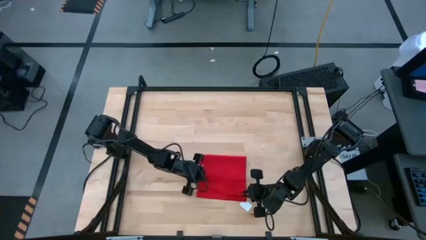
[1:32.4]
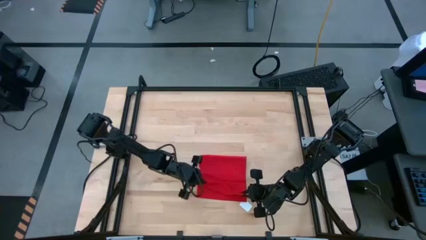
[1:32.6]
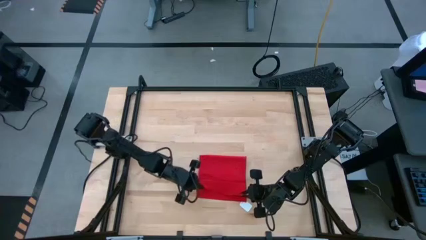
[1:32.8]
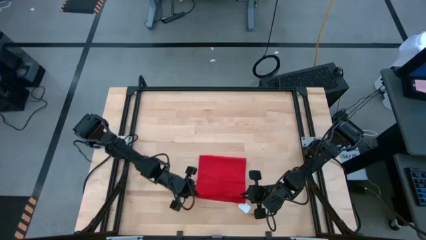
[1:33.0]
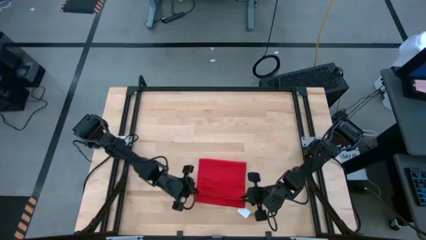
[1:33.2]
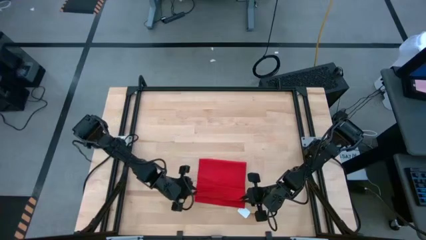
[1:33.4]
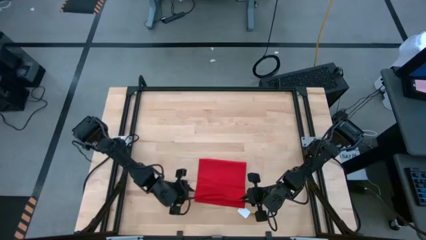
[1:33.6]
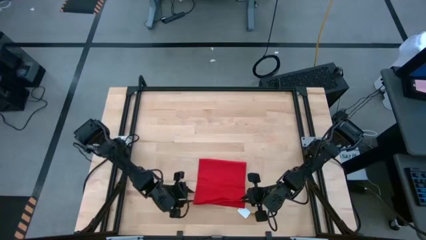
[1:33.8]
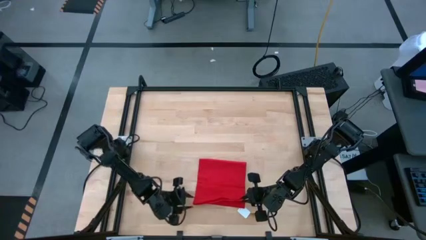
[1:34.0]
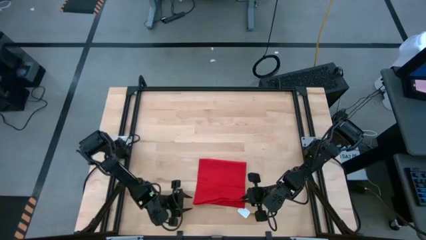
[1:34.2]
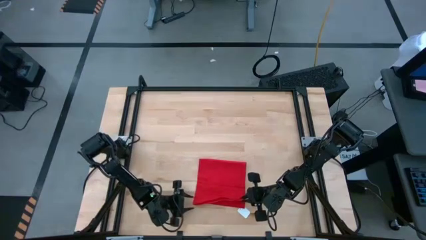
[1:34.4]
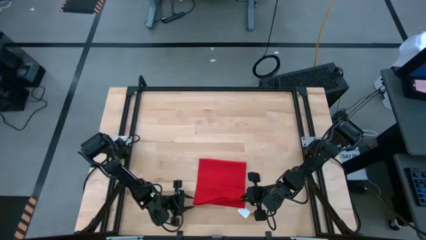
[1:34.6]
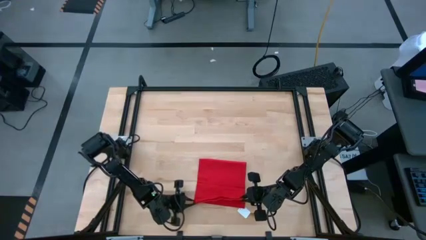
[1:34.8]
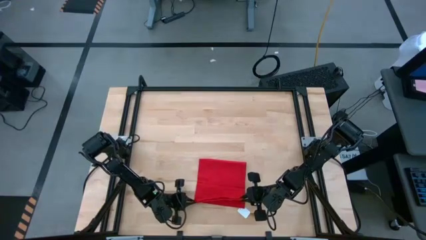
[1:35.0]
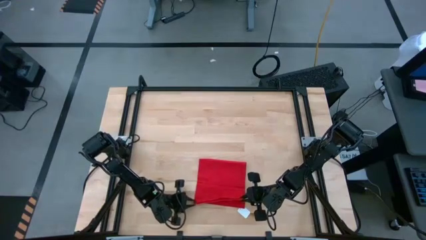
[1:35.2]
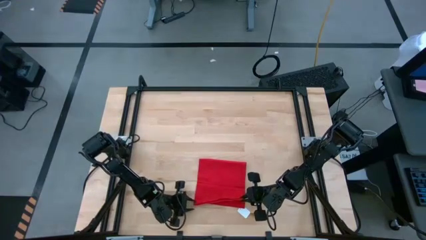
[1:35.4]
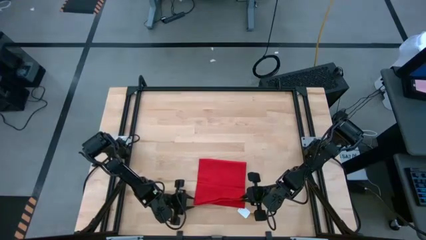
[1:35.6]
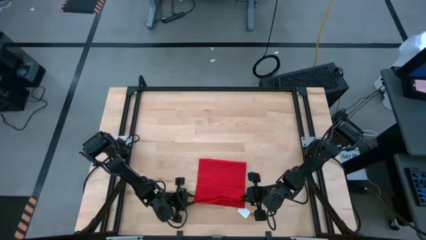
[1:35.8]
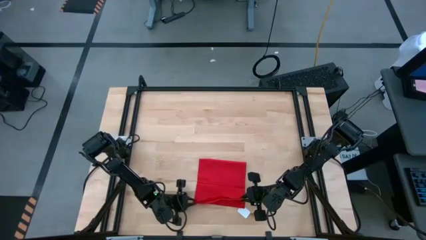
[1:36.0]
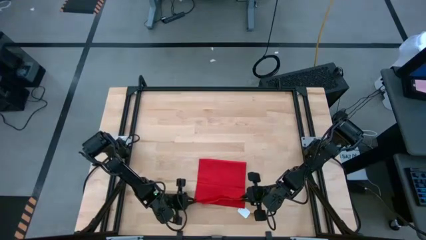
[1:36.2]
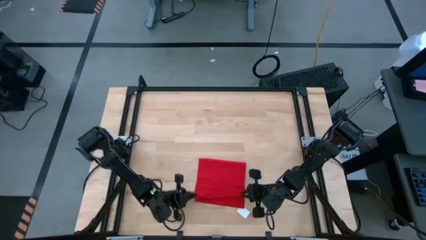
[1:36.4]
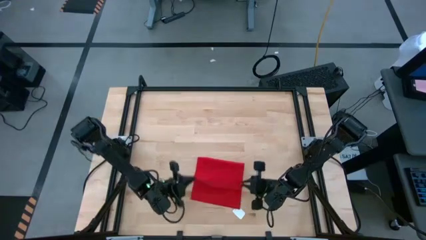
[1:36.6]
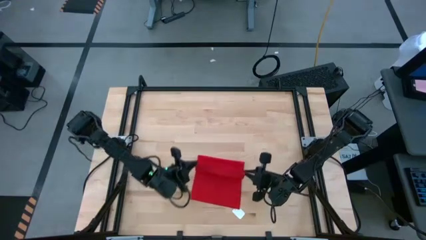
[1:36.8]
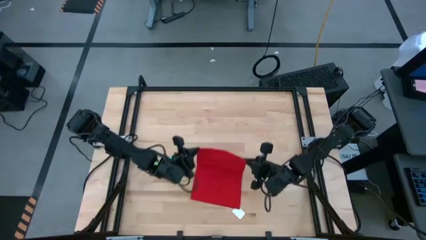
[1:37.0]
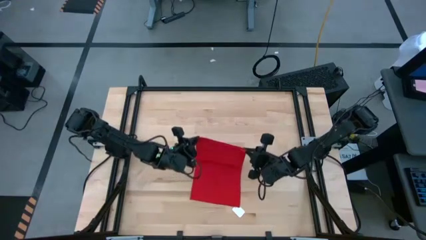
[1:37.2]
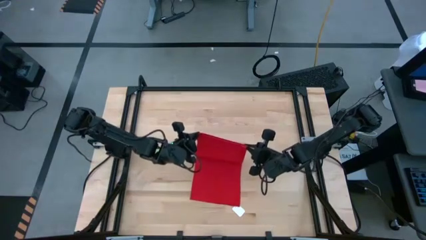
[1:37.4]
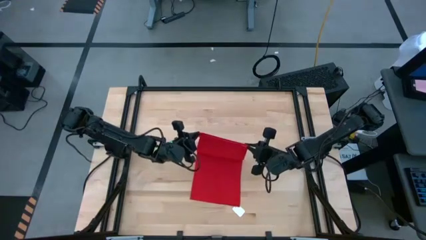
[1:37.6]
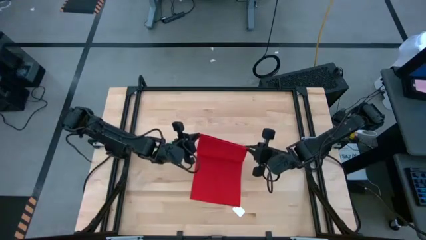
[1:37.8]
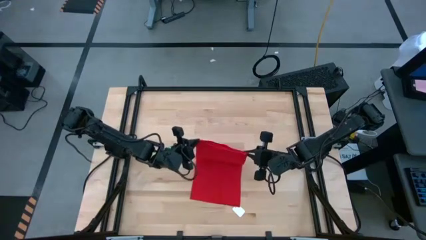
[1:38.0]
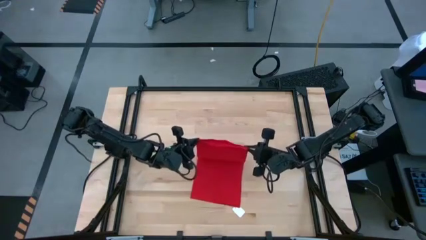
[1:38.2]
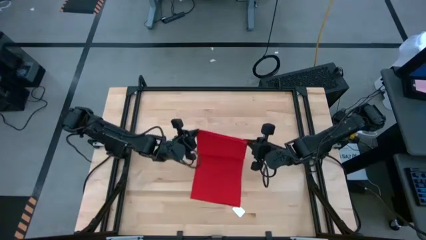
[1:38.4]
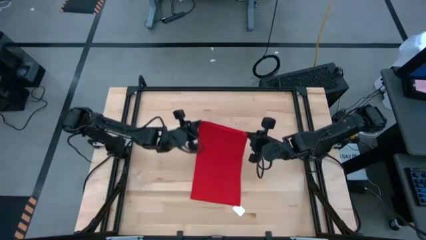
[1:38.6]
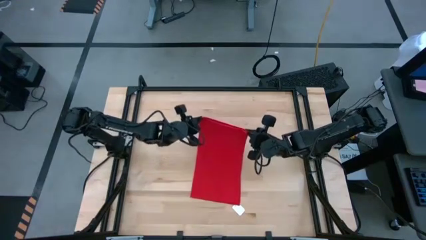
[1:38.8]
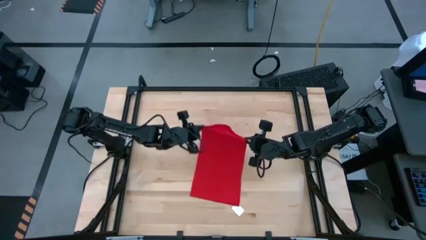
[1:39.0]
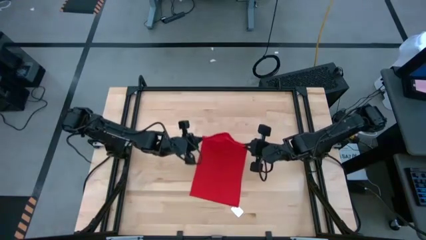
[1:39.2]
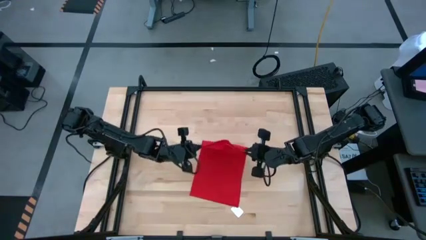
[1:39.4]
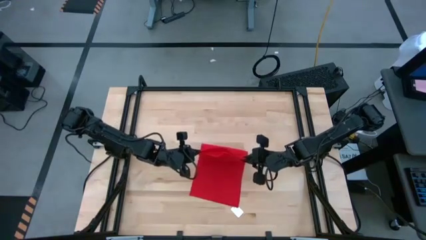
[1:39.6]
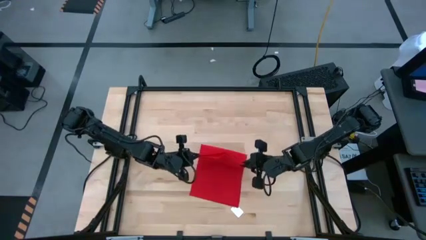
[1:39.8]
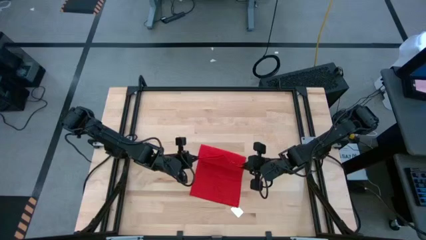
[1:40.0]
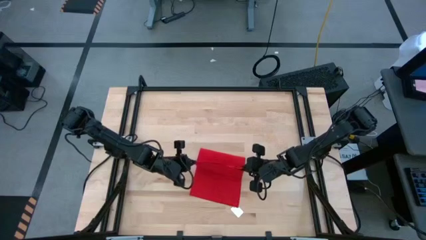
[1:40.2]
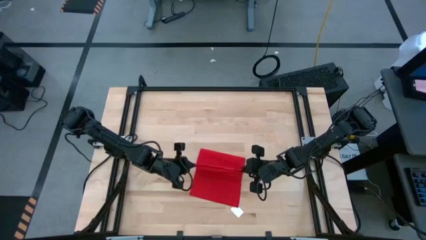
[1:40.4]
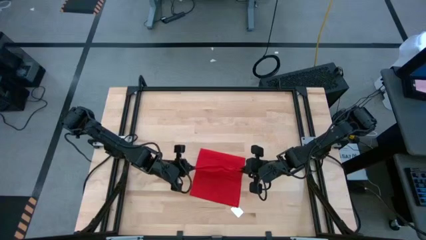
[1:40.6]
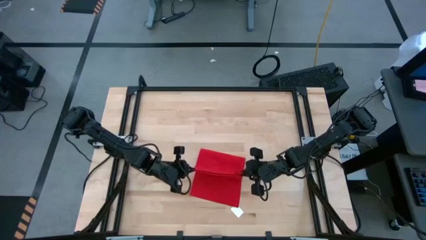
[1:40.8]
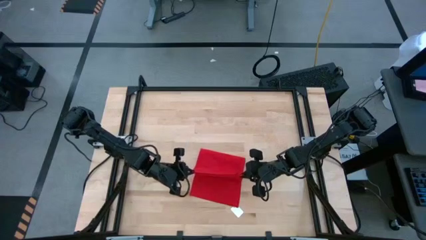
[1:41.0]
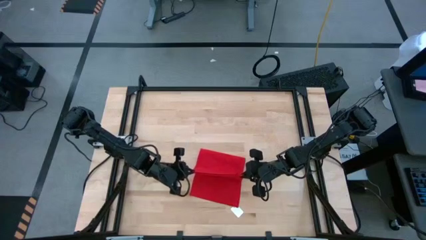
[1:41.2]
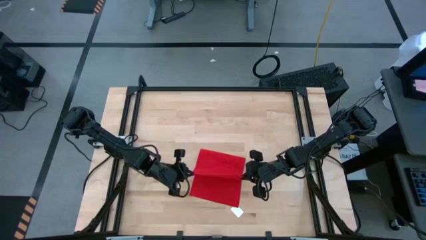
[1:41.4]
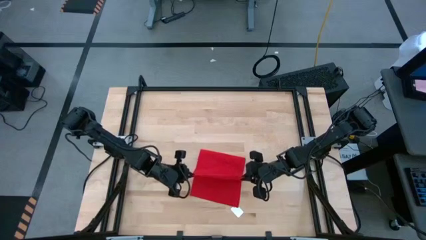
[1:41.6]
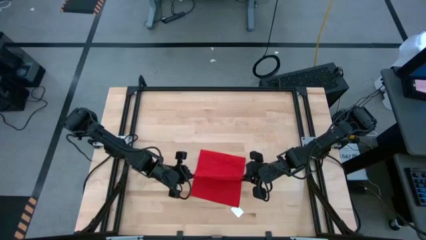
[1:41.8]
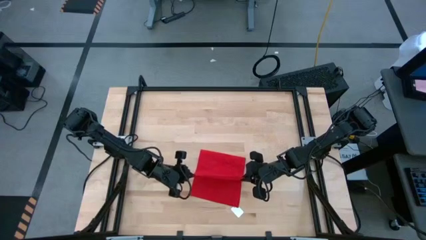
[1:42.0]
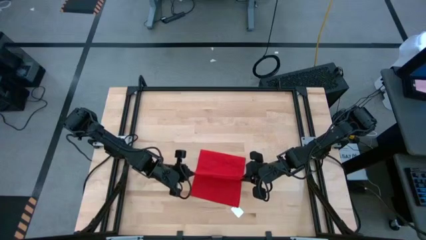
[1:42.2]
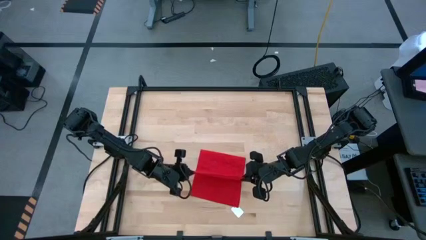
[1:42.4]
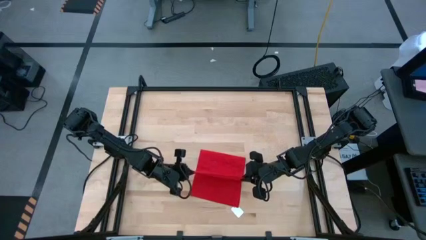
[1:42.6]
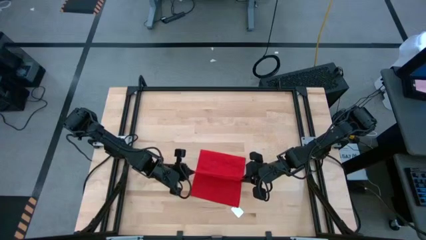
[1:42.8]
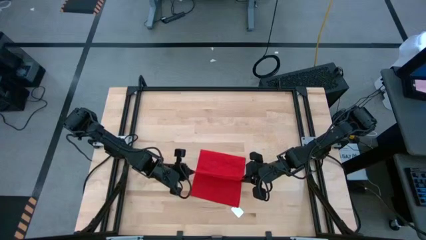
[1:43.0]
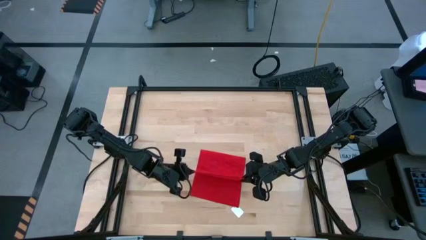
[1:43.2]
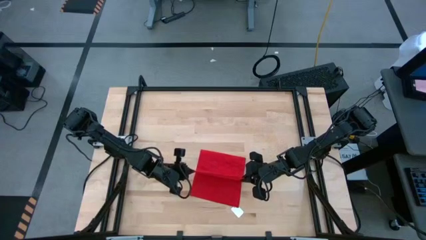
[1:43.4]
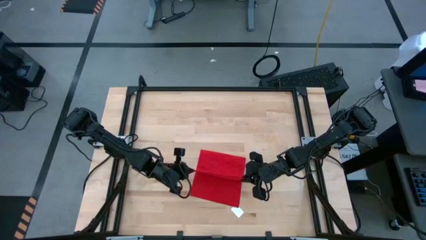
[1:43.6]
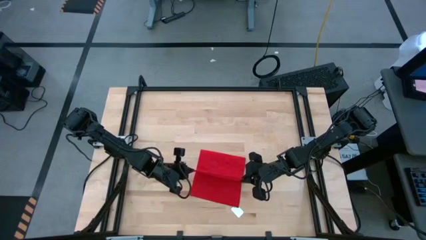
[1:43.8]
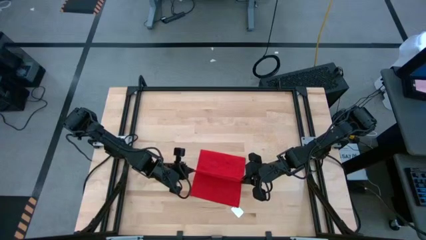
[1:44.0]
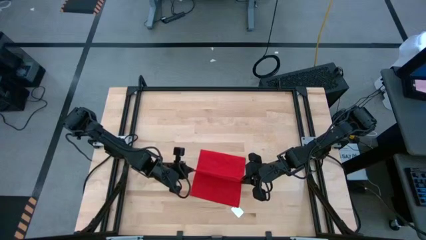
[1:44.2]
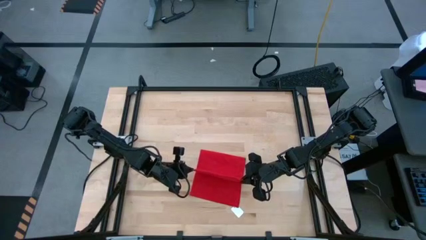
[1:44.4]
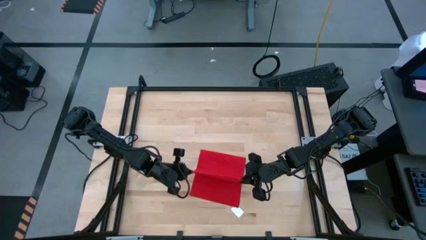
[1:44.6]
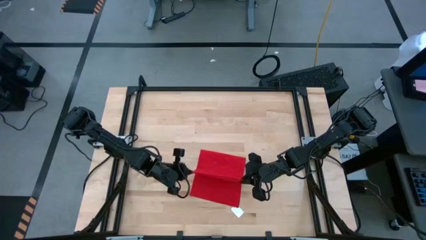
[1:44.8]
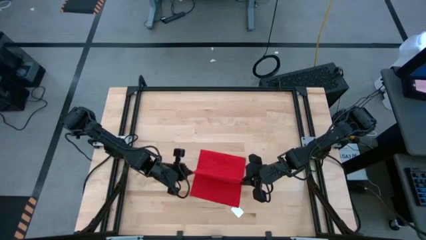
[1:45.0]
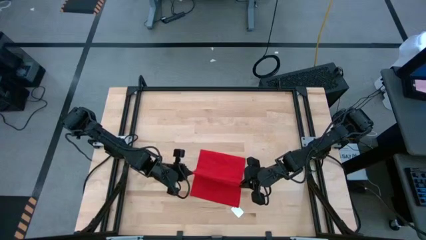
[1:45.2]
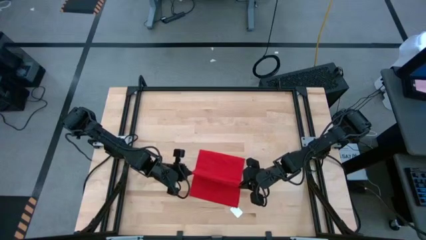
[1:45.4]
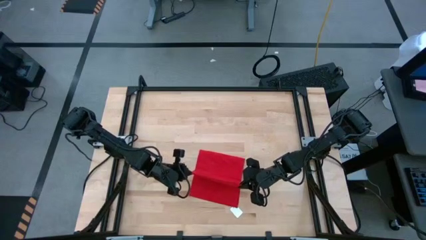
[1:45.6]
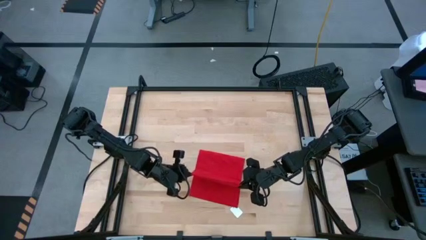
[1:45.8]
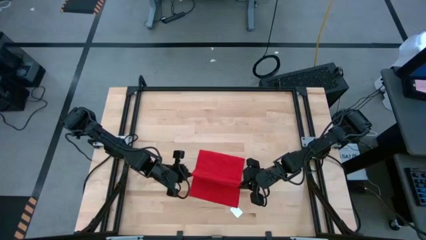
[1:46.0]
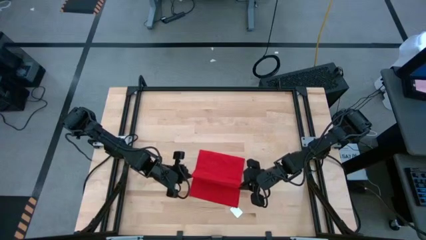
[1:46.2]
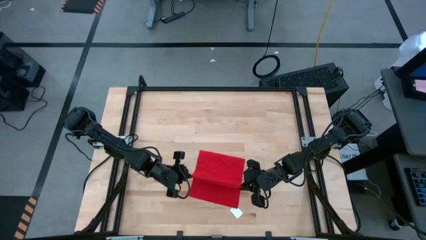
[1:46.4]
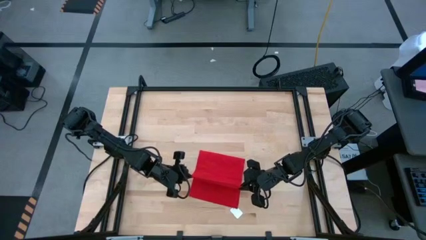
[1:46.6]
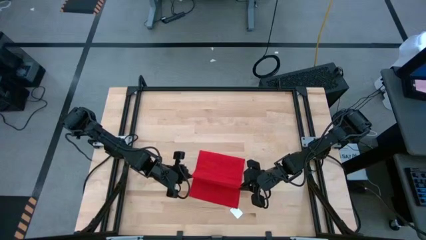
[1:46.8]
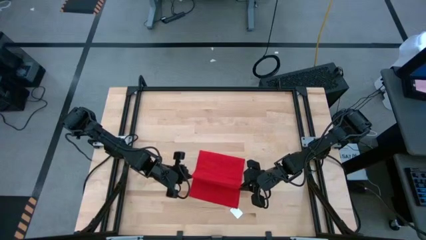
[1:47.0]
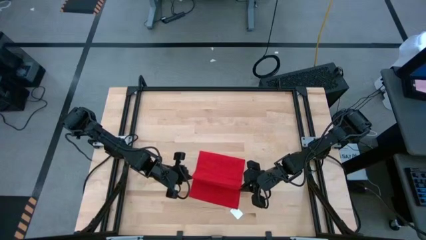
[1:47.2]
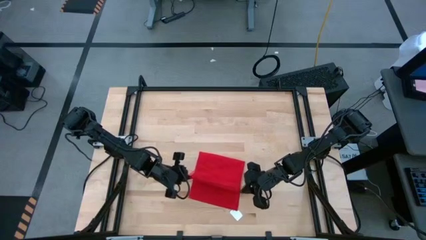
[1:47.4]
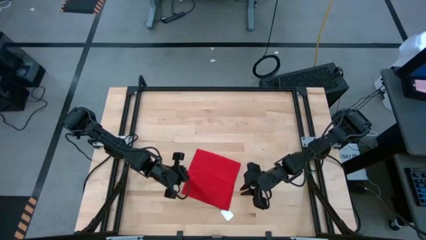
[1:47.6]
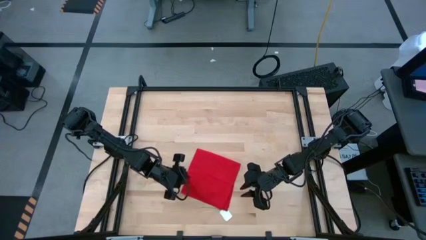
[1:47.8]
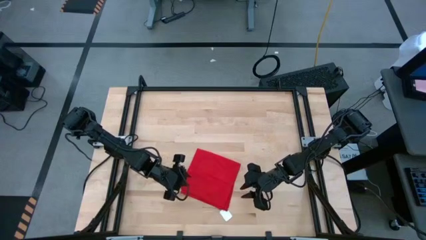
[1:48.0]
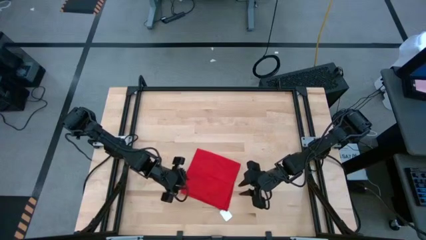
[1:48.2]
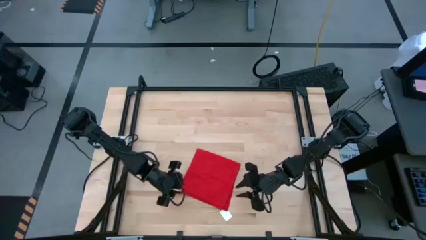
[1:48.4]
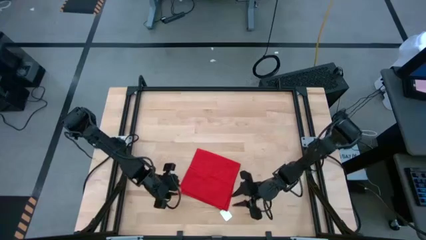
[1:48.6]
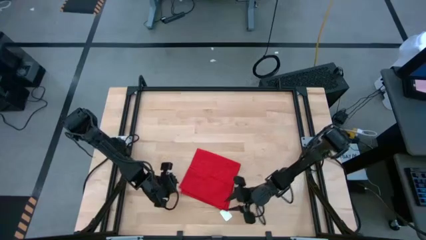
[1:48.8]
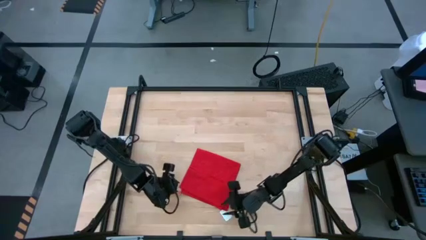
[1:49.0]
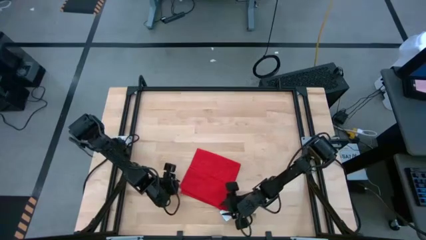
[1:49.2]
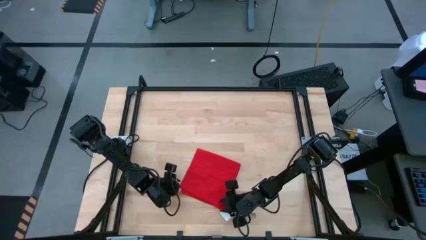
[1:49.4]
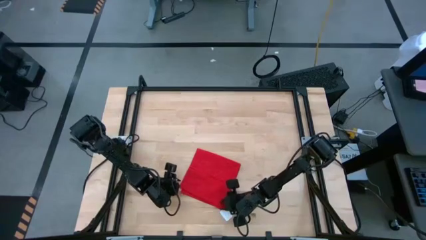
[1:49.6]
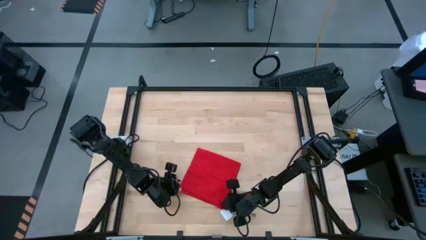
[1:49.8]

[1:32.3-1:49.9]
Task: Roll napkin
Fold the red napkin
